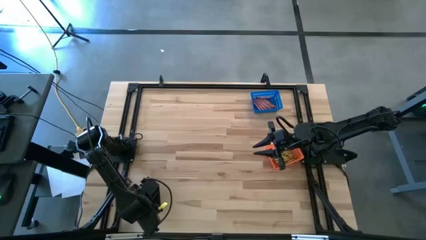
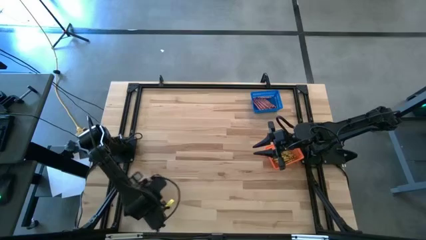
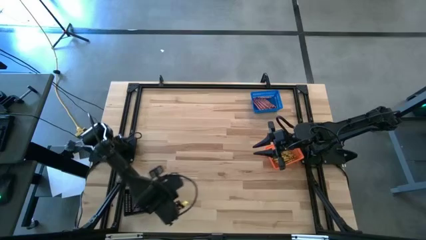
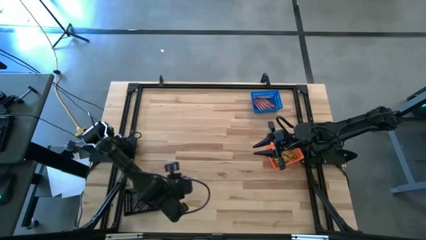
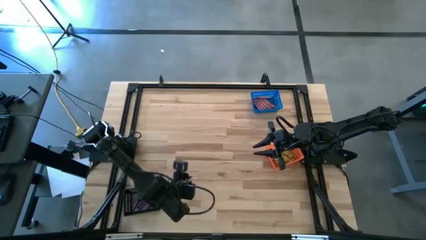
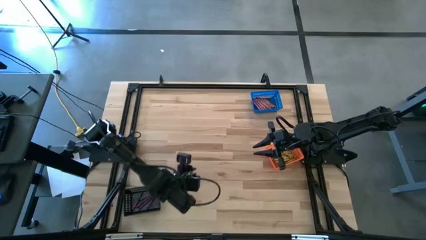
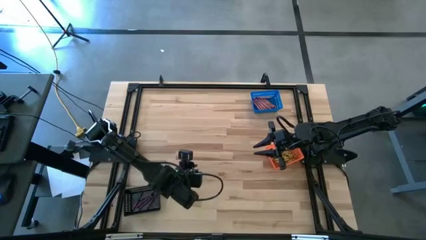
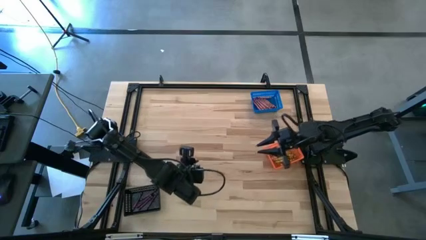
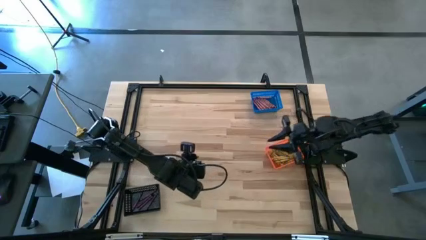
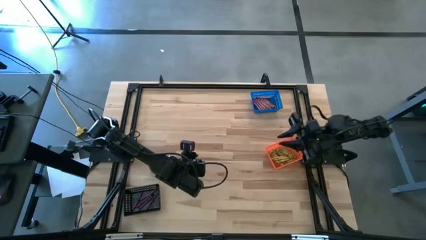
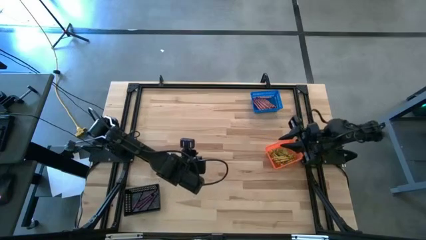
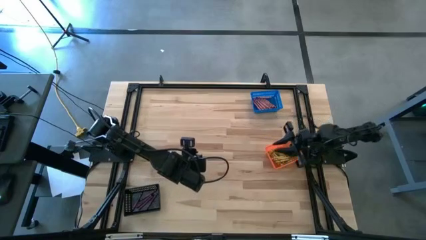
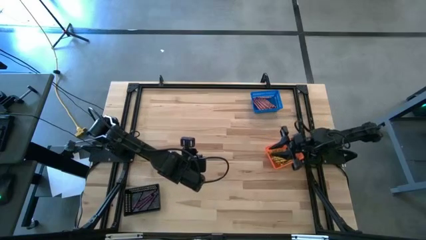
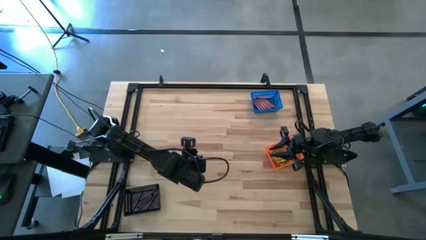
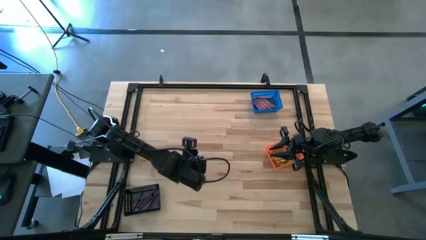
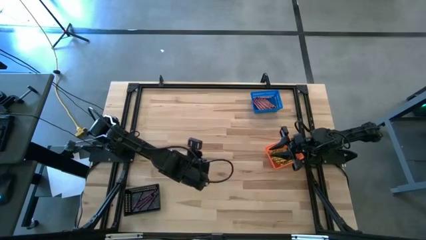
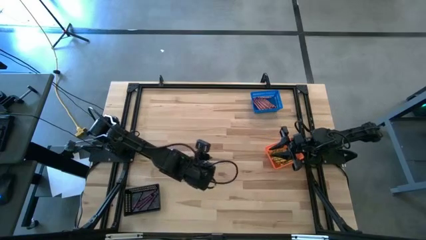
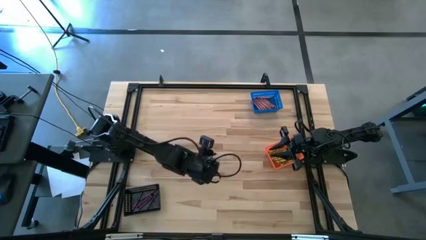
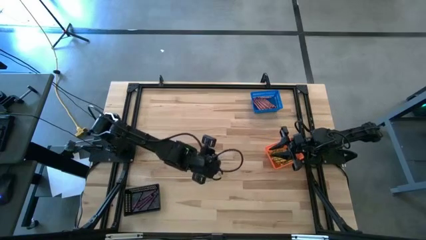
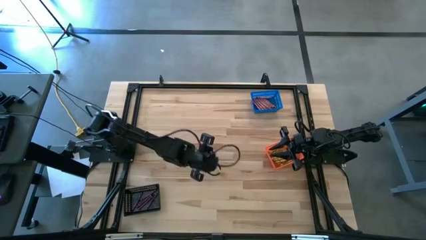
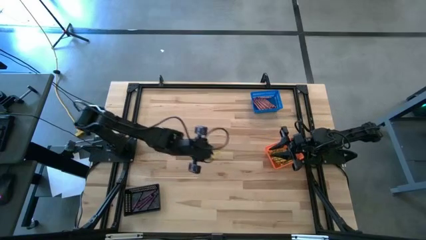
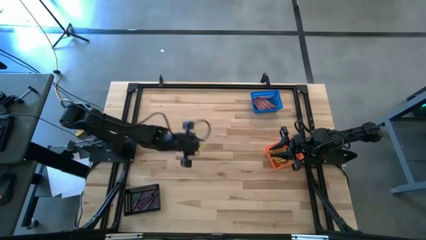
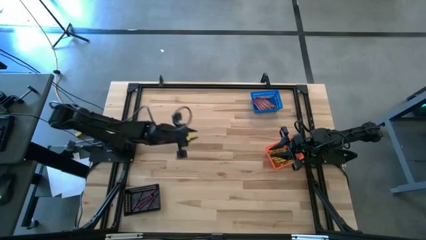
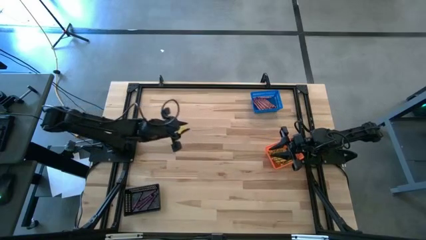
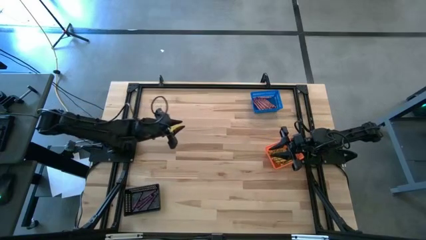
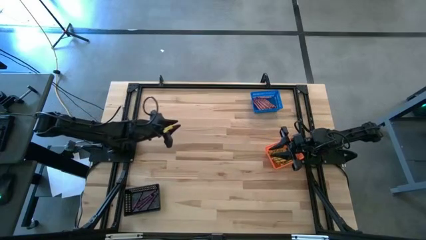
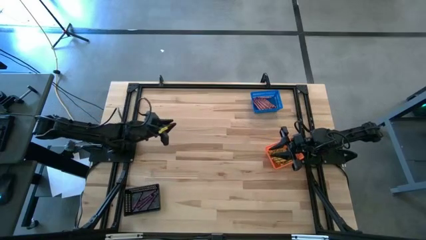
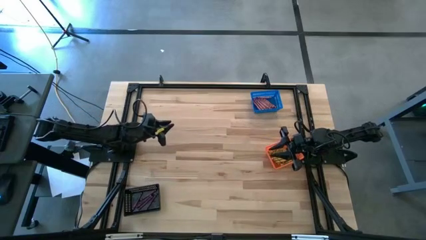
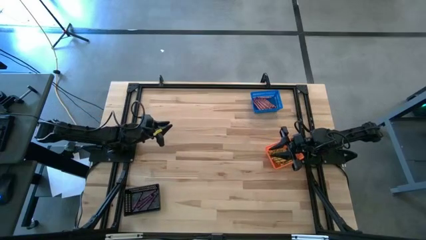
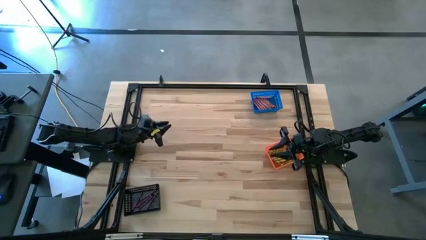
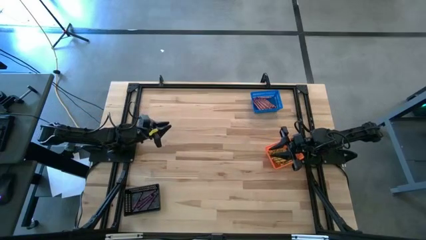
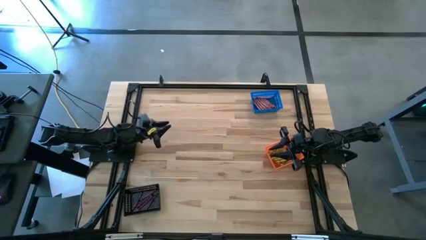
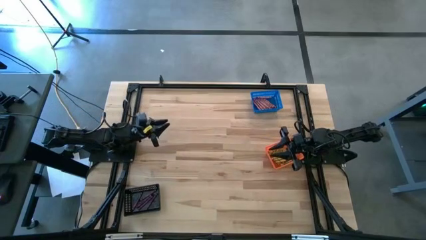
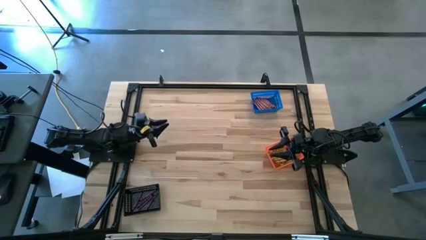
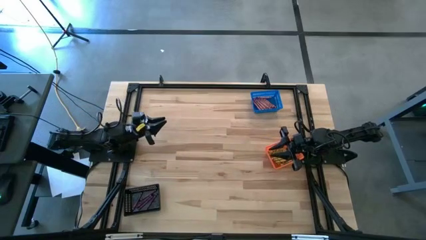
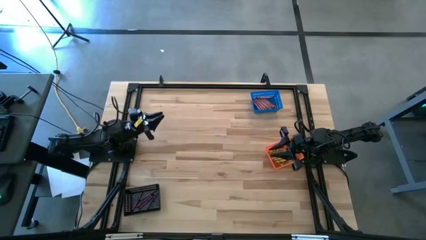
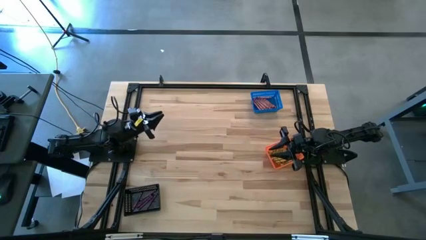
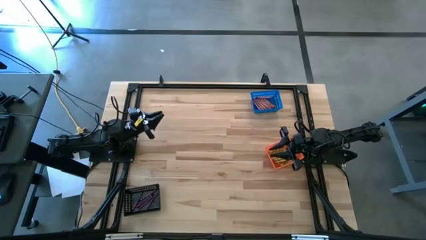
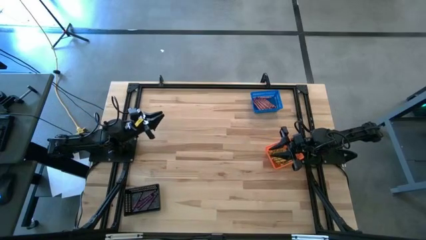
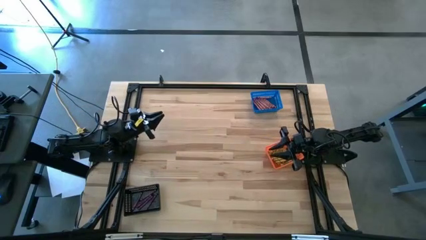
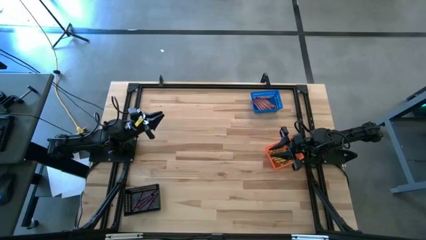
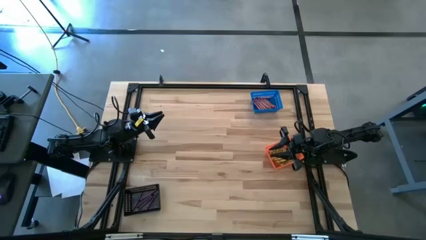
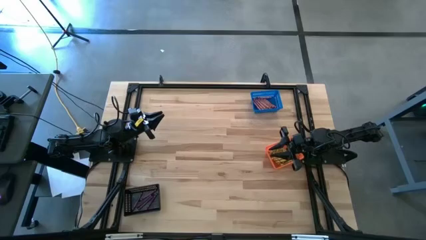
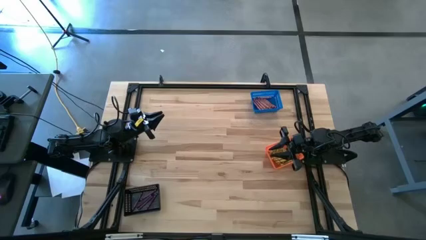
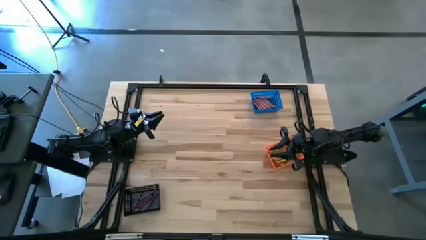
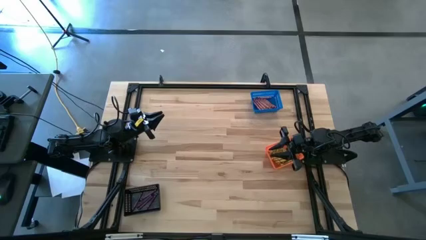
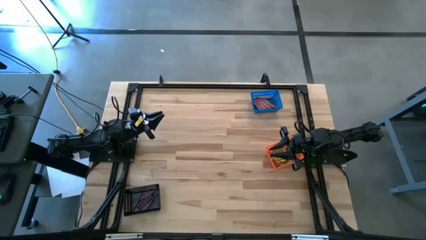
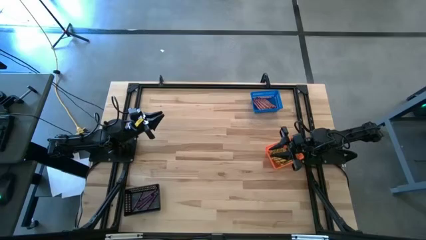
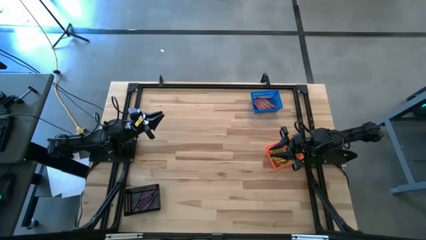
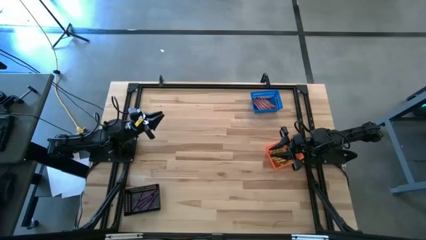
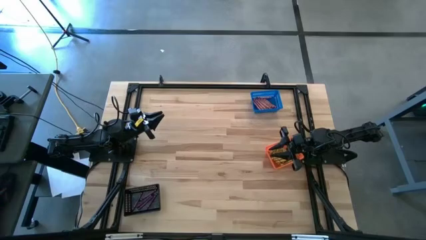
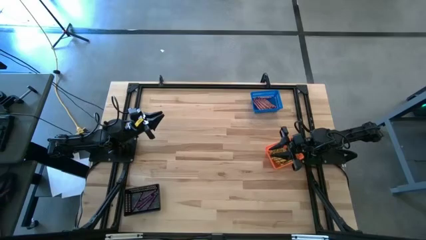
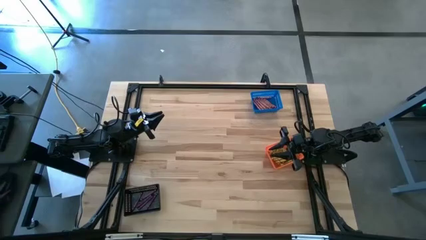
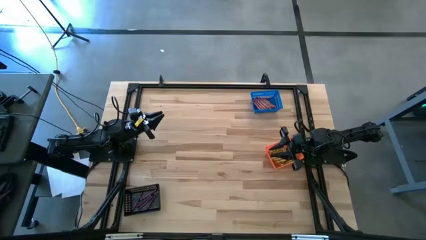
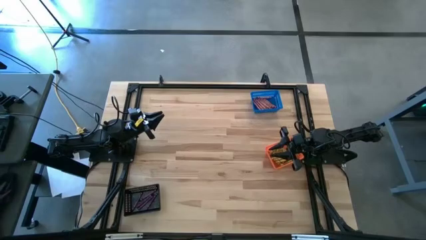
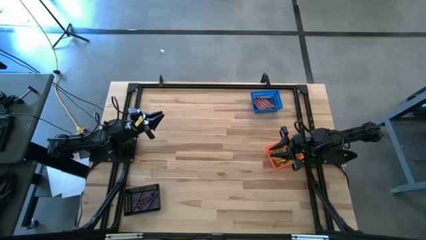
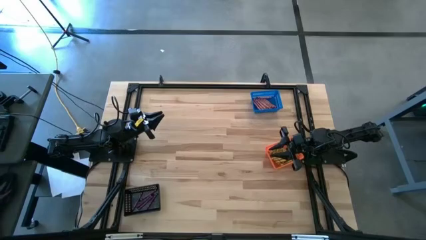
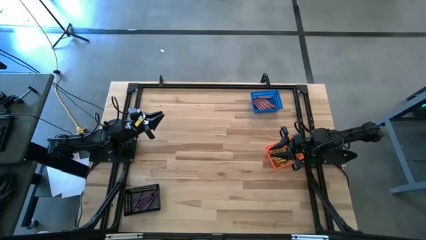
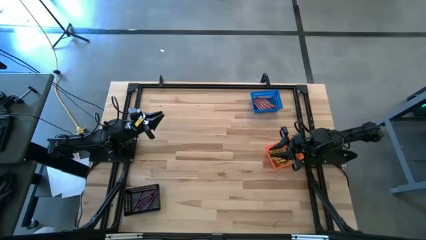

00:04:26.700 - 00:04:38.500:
Task: Sort crayons
Return to Home Position

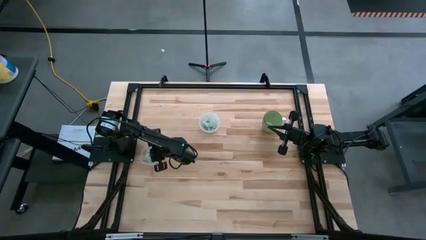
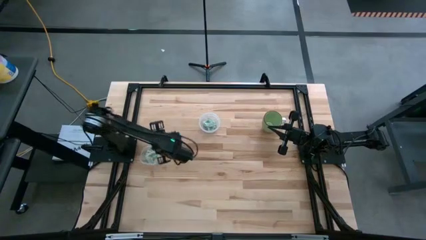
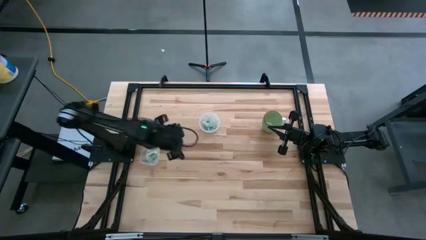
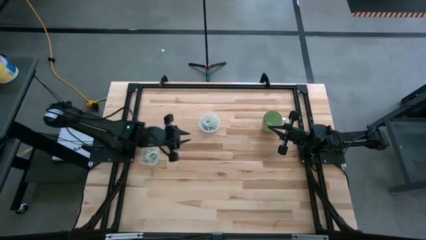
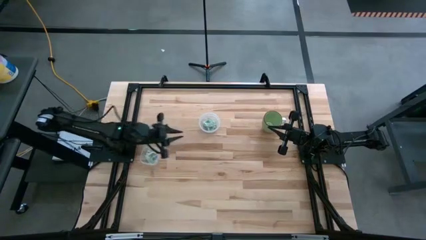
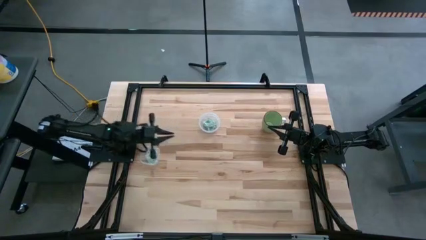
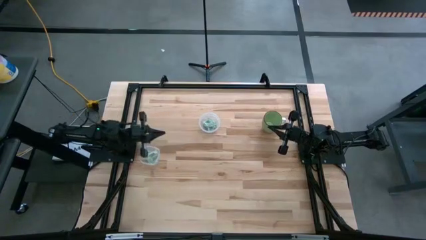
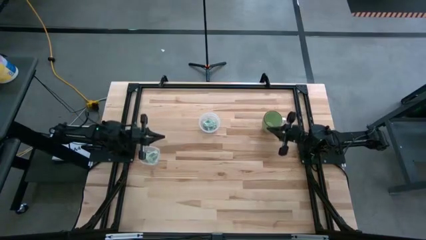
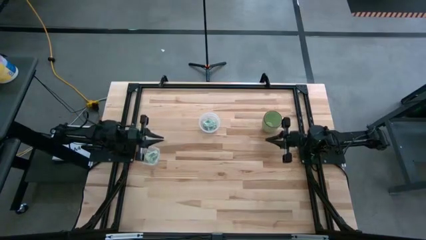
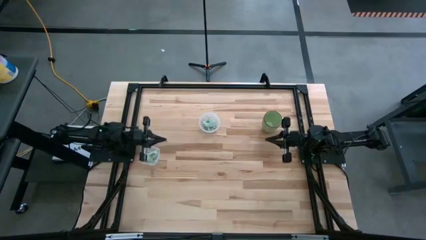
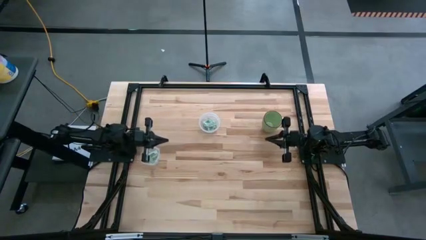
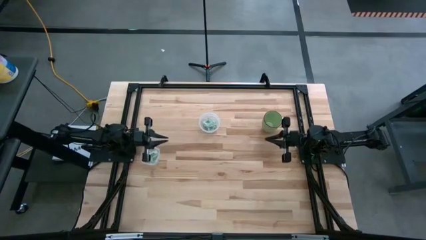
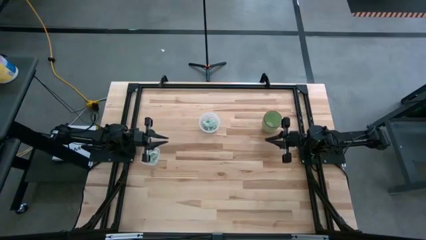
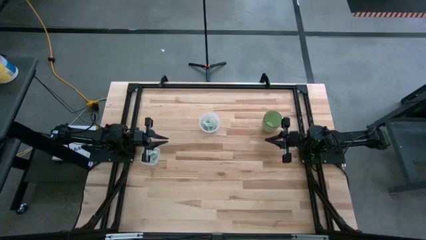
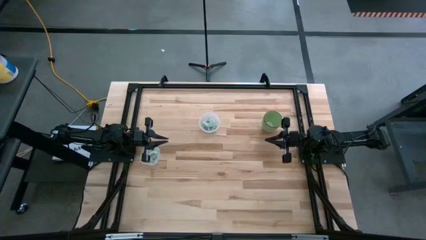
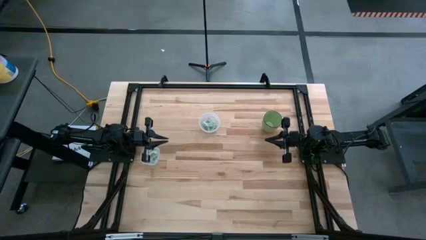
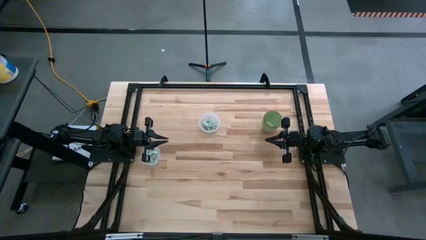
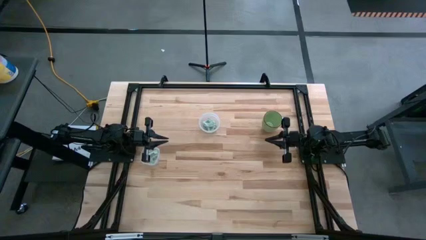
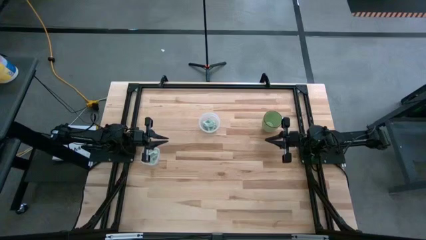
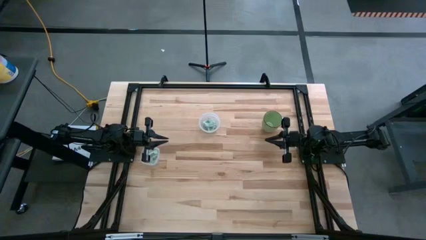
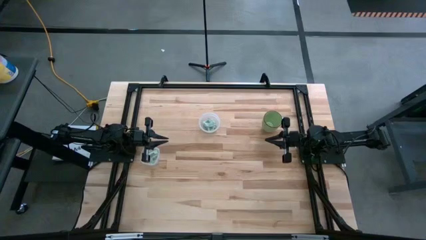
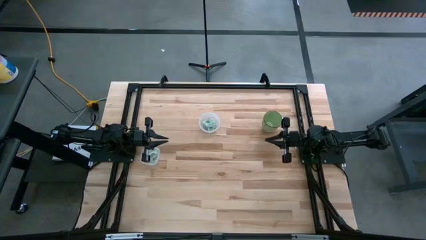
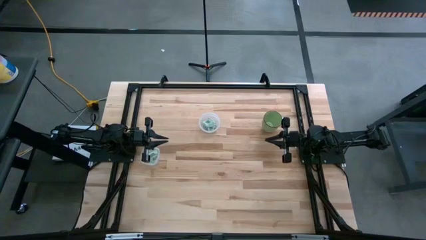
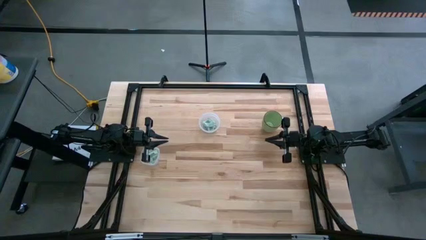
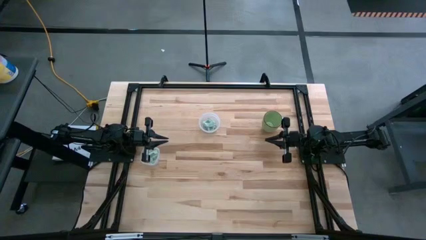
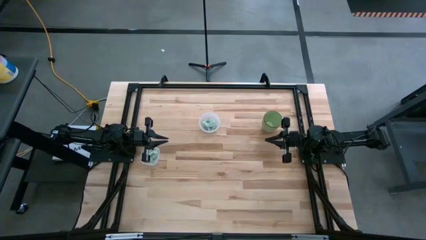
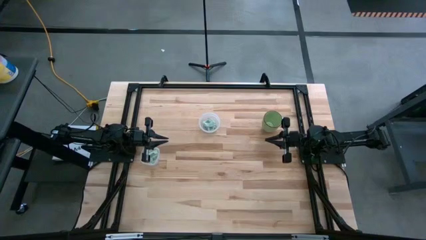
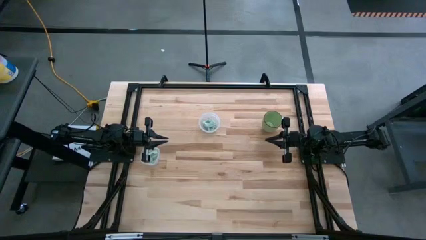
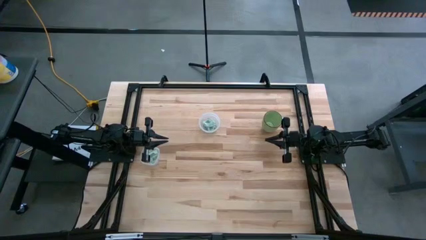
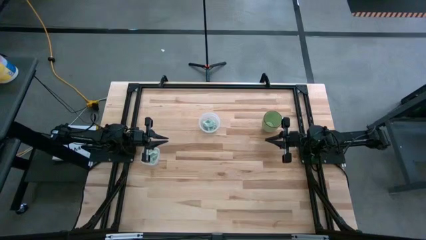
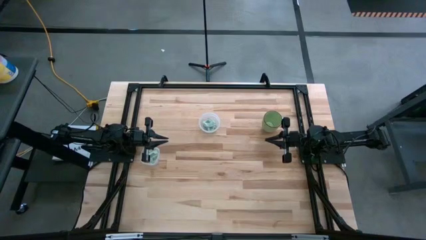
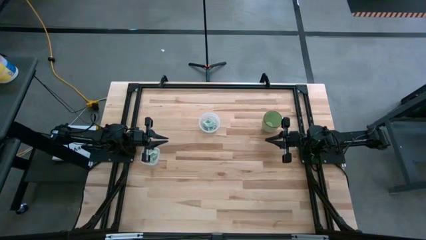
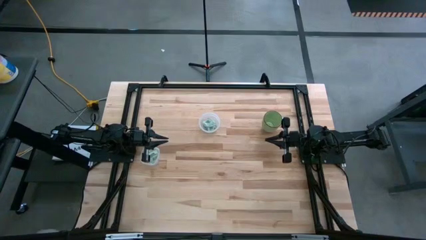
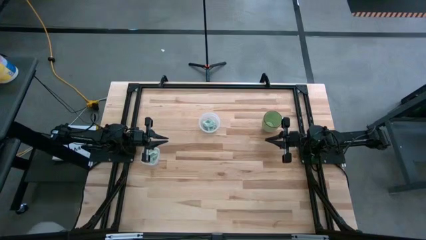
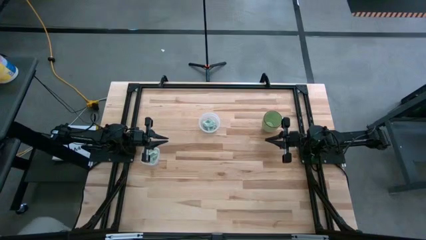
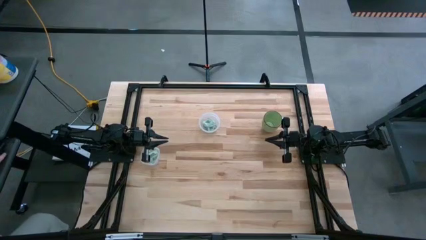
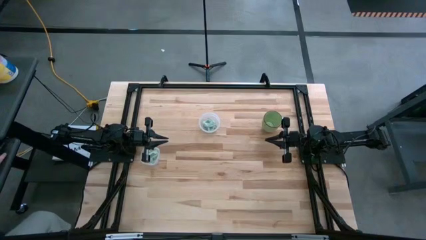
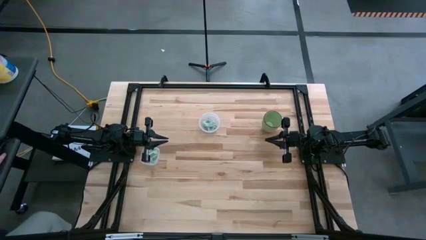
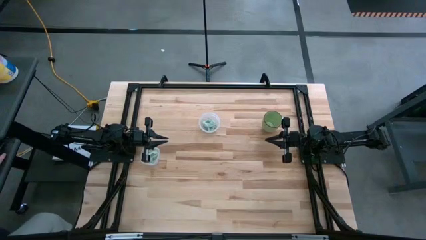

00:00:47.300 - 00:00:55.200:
Task: Pick and place Stevia / Truvia into bins
Return to Home Position
